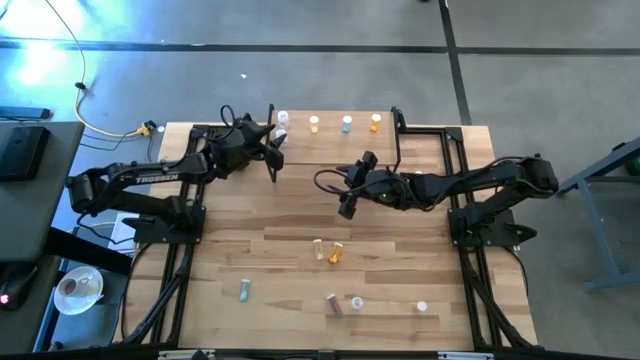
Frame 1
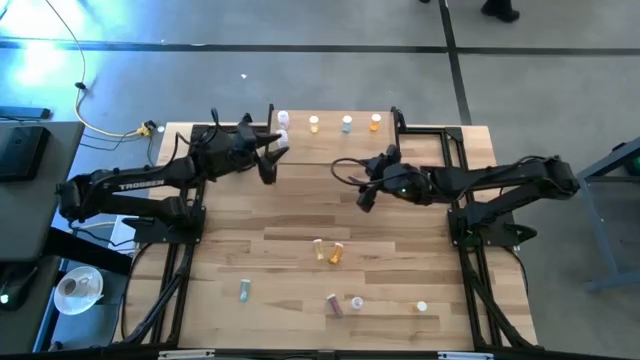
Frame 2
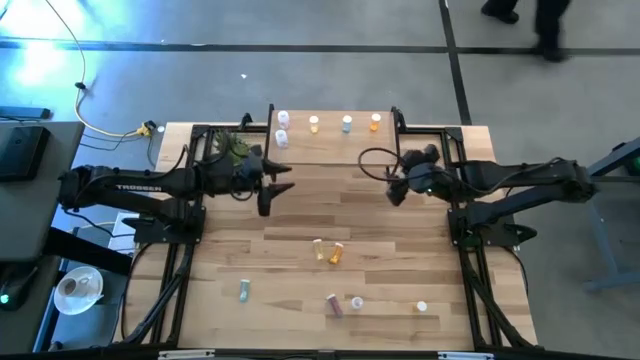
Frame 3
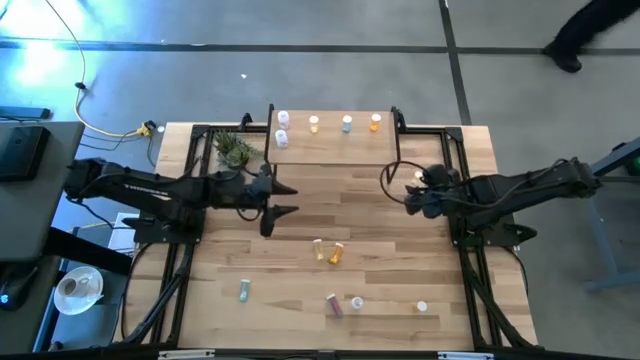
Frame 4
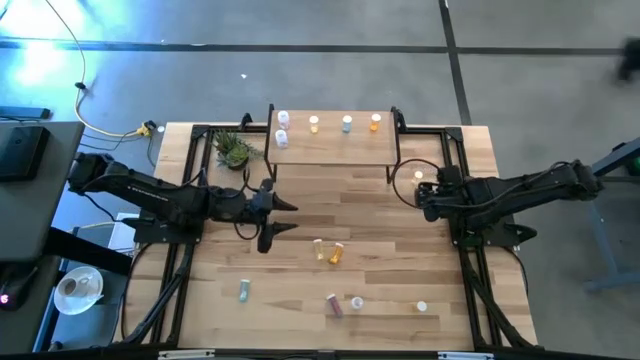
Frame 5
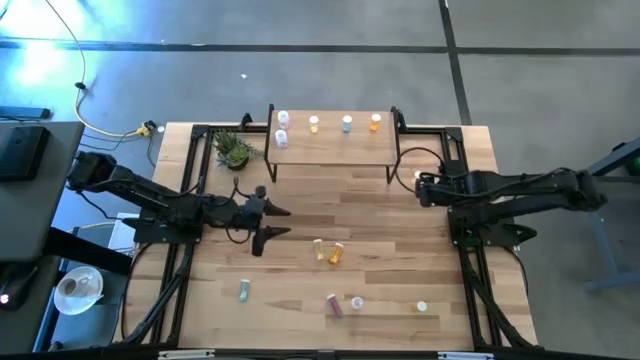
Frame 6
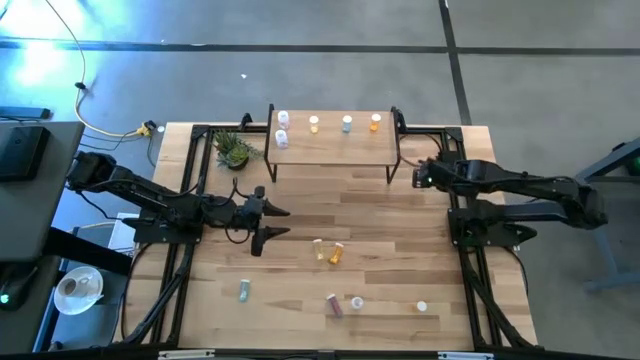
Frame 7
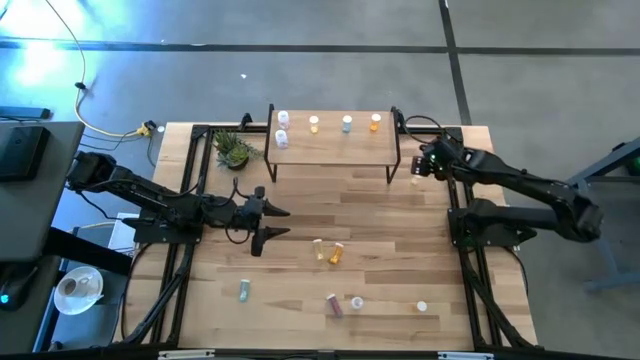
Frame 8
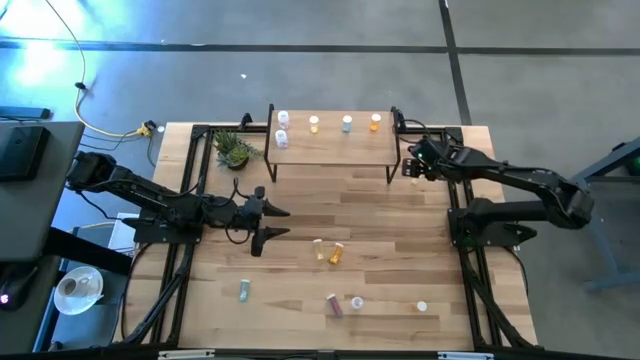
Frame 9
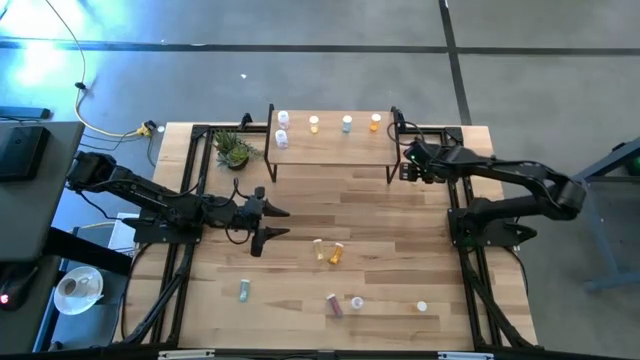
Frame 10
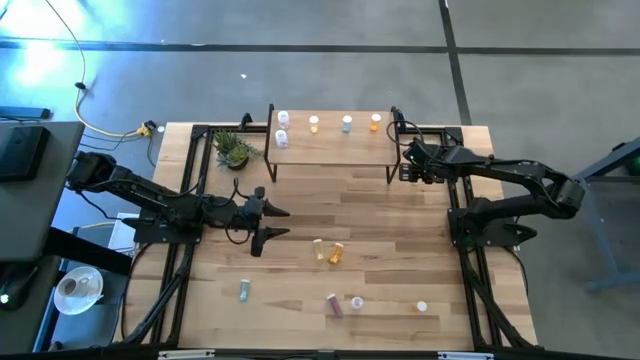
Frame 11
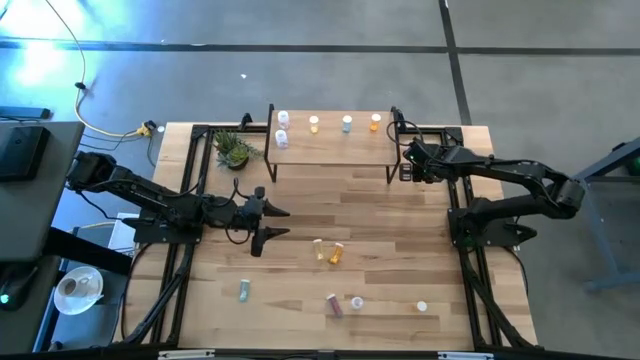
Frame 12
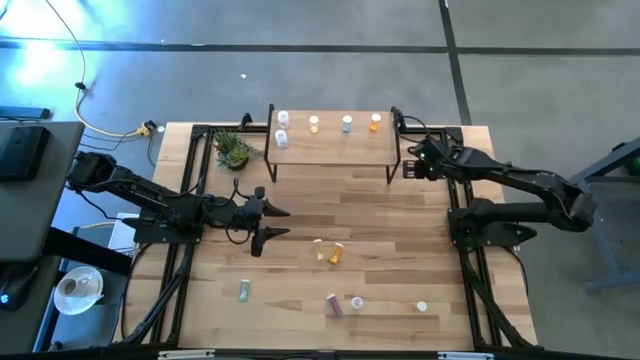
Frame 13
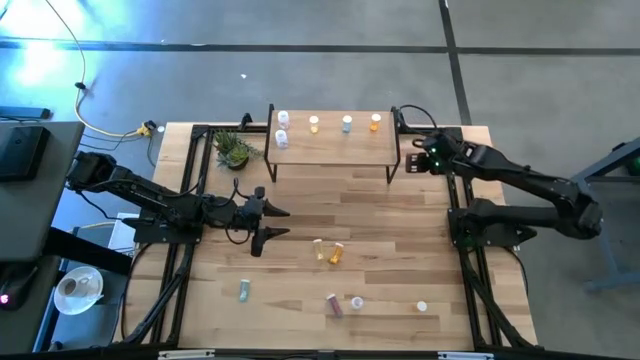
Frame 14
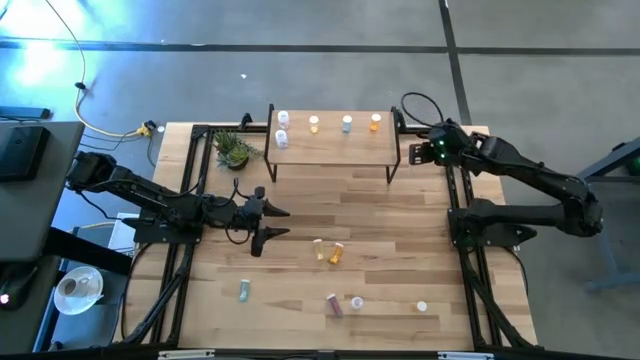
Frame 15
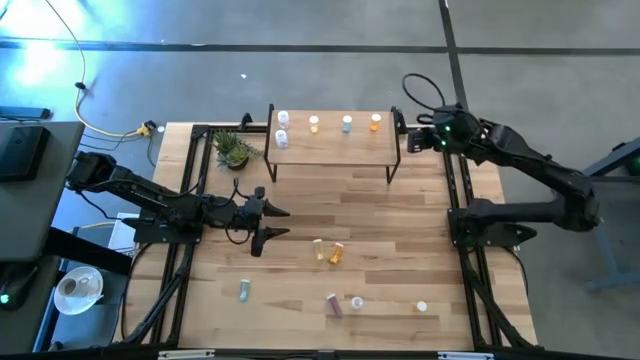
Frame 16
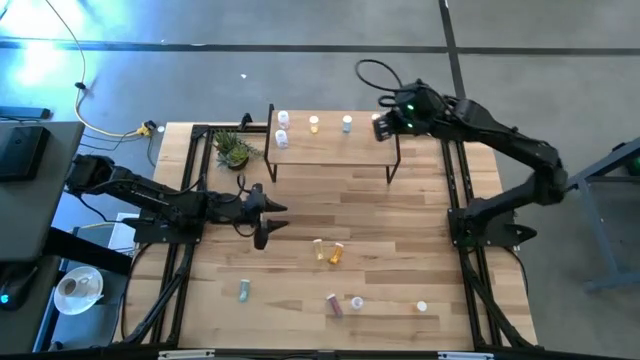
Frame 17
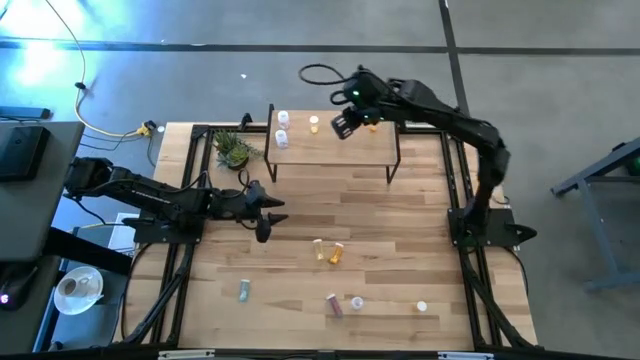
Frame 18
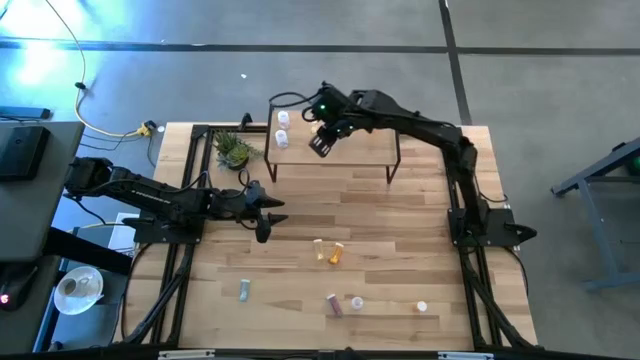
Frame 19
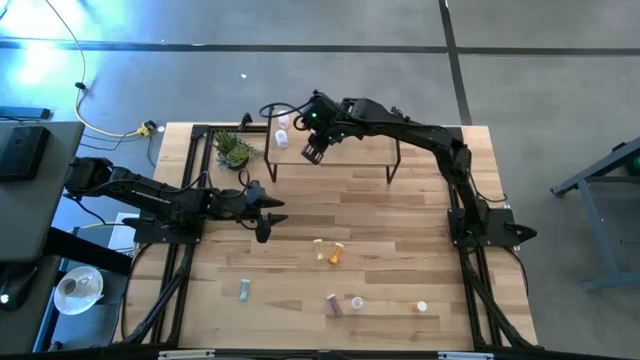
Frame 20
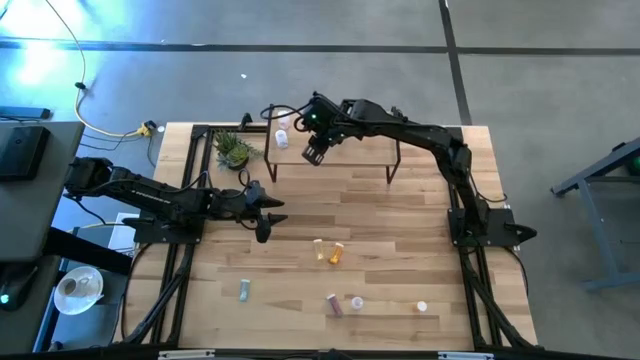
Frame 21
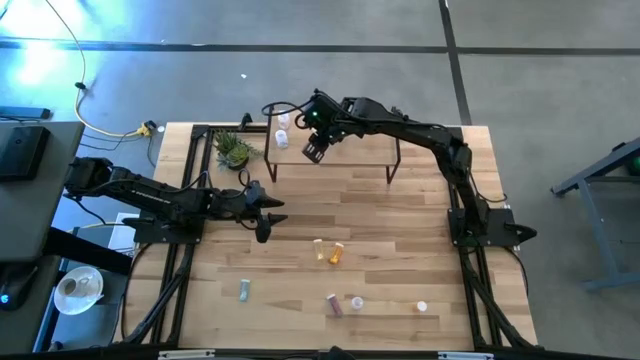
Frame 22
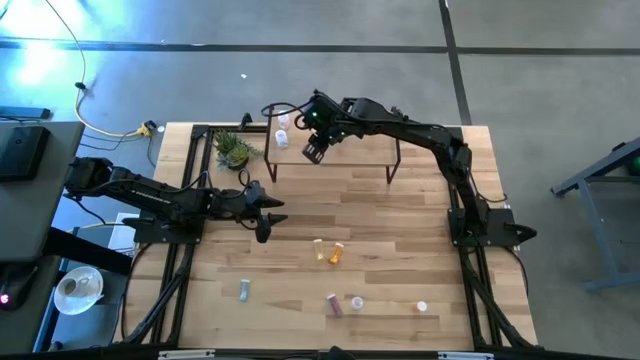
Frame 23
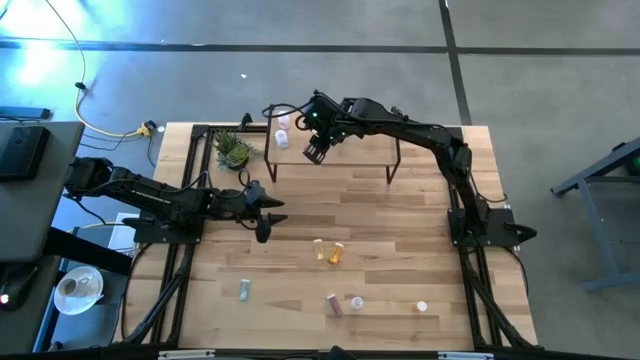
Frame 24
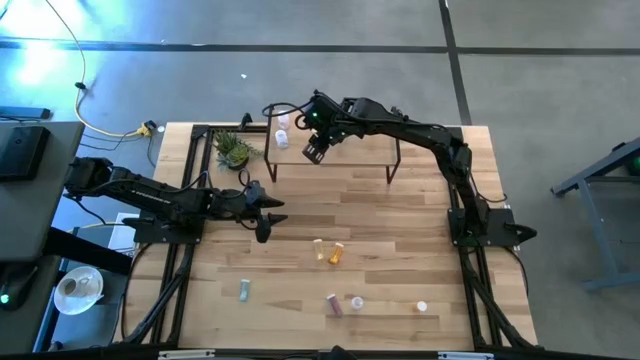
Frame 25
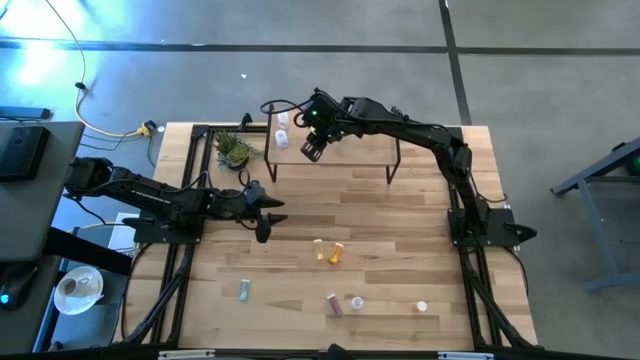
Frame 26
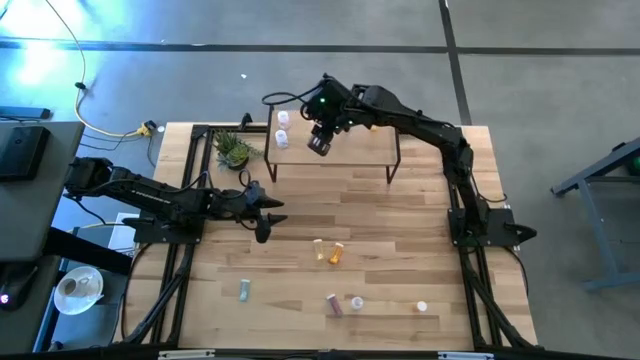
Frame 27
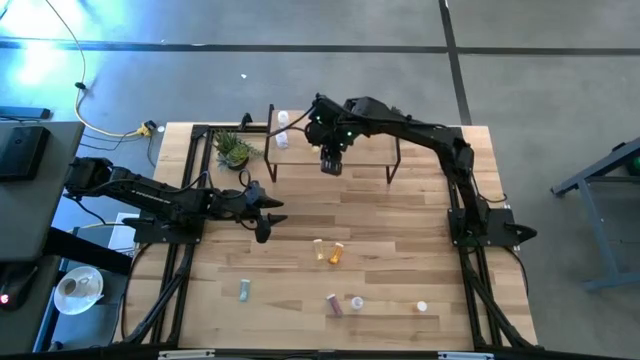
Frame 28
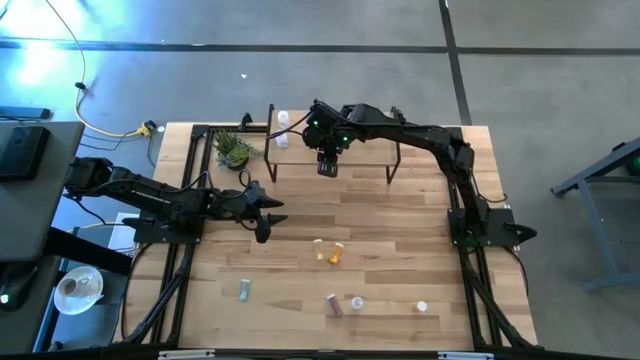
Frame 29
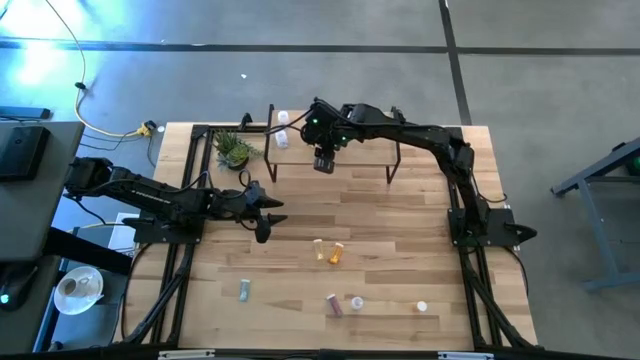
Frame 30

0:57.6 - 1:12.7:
Task: Pick and place medicine bottles onto shelf by color
Put the yellow pill bottle aligned with the other yellow pill bottle on the shelf

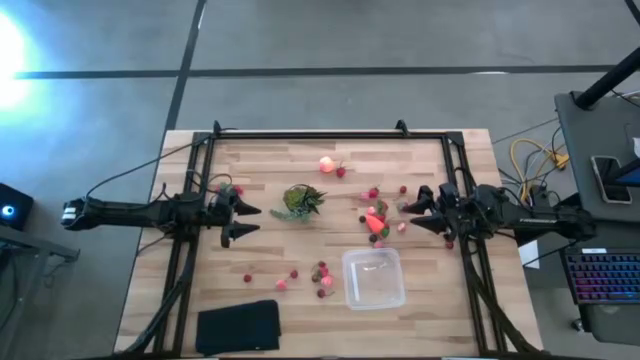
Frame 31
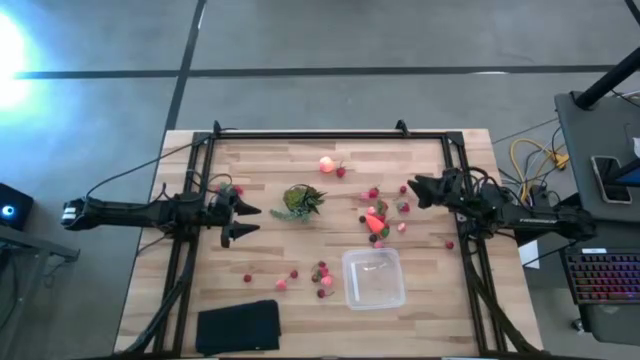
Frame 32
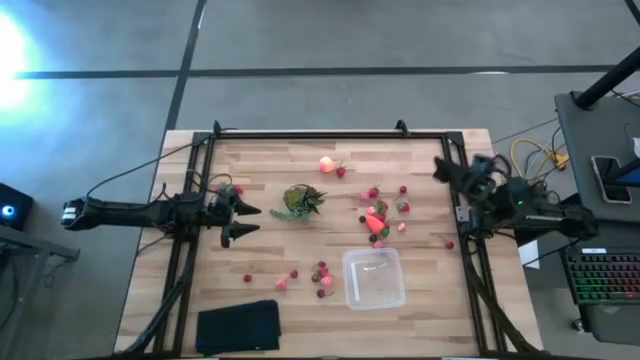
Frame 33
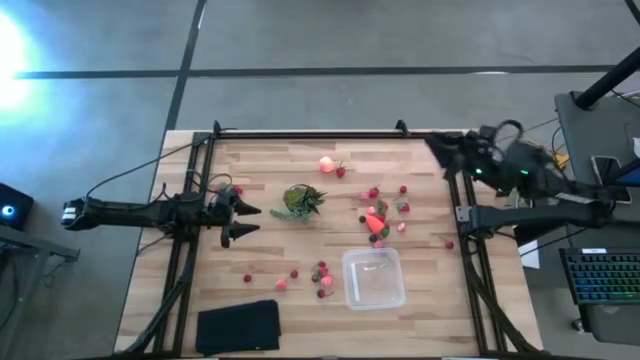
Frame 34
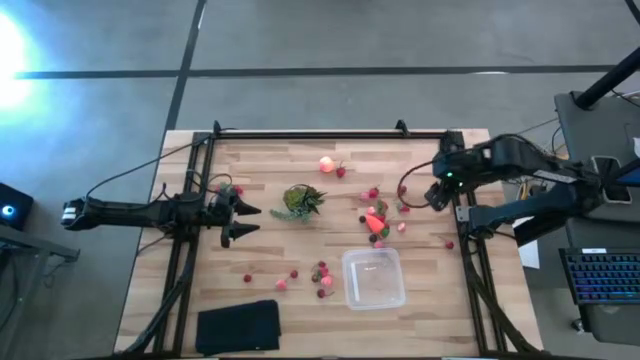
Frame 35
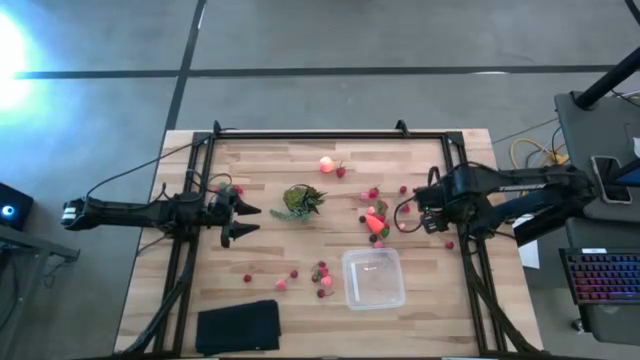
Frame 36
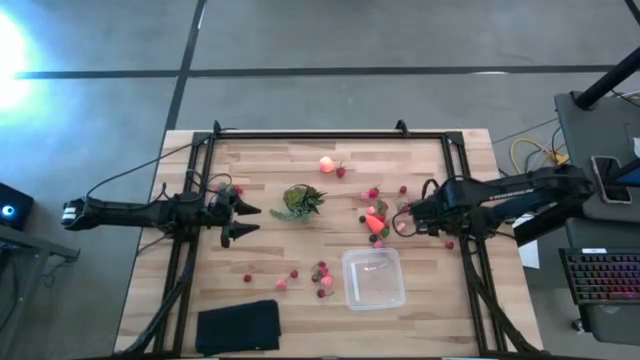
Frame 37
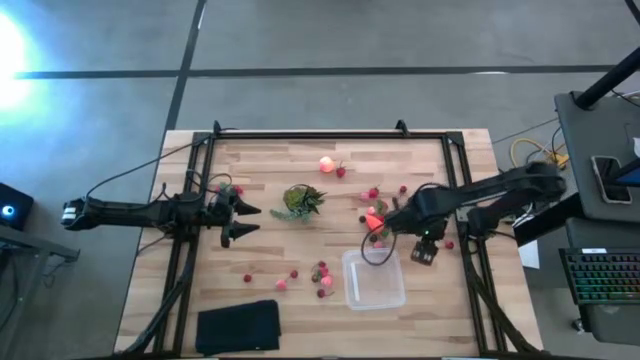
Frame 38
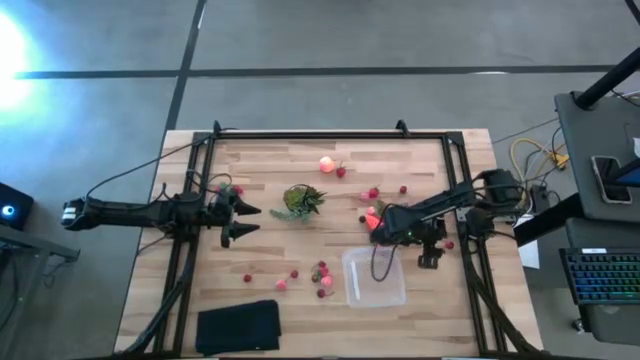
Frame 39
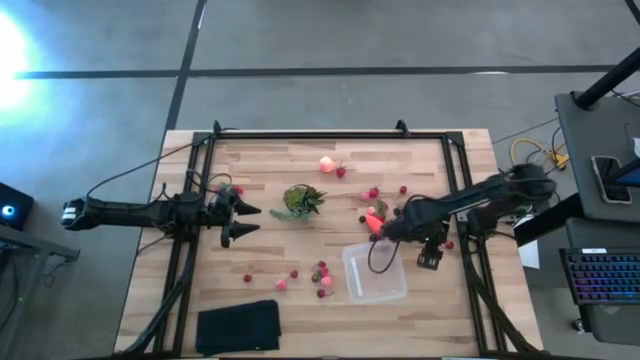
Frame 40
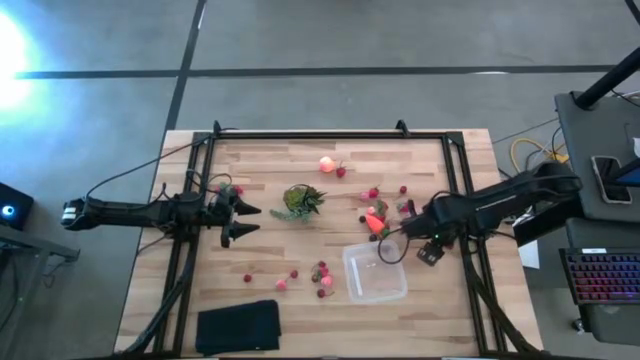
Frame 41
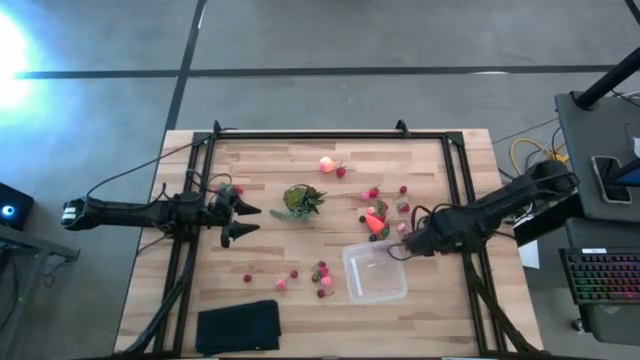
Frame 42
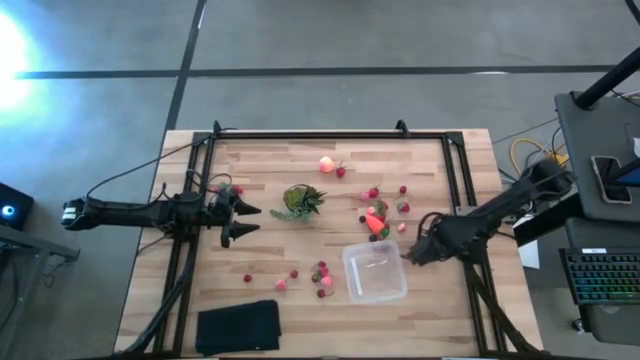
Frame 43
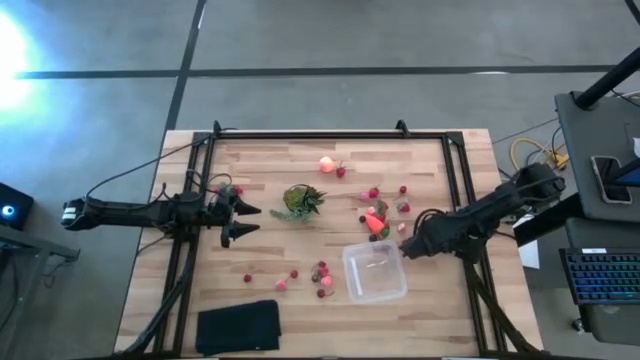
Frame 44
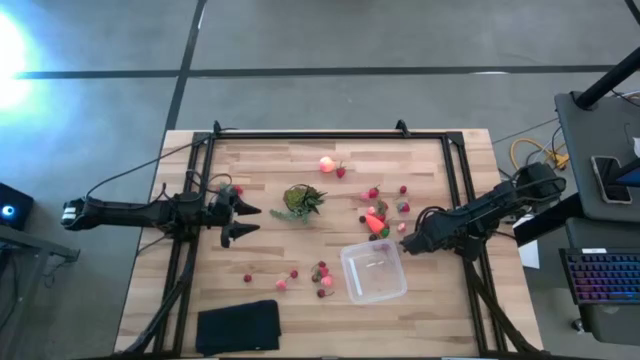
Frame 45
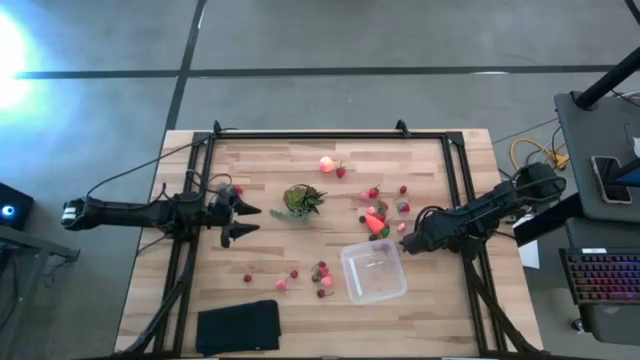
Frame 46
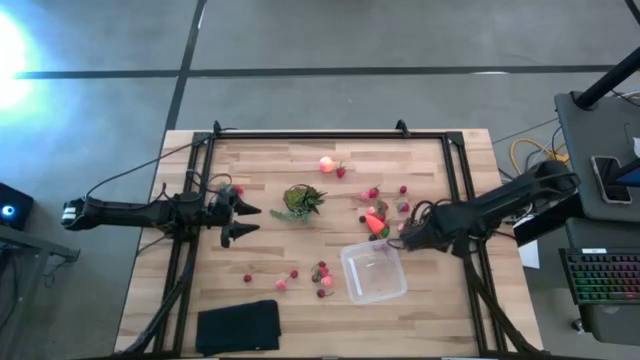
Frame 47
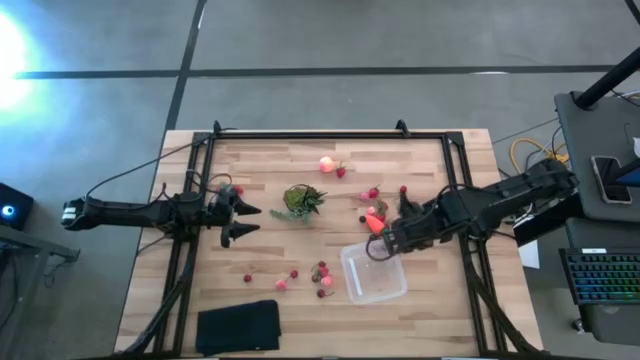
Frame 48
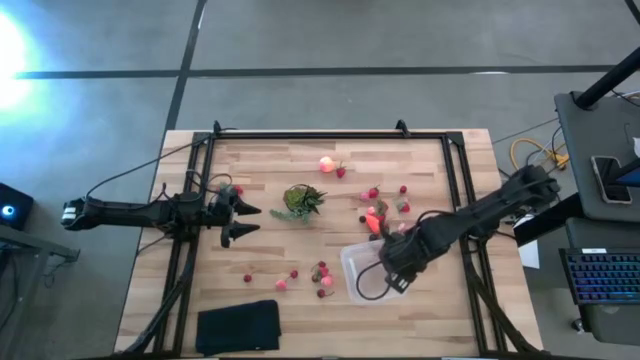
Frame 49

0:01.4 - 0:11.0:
Task: Pick and placing Produce into tupperware
Put the cherry into the bin
